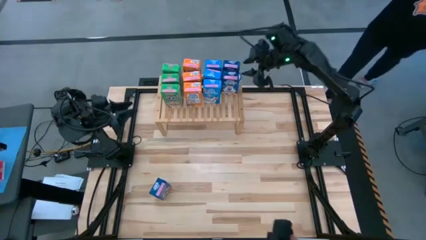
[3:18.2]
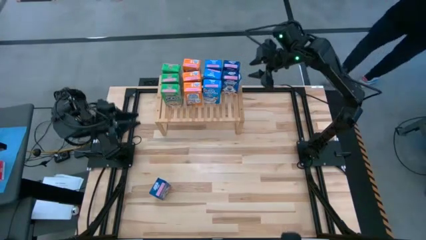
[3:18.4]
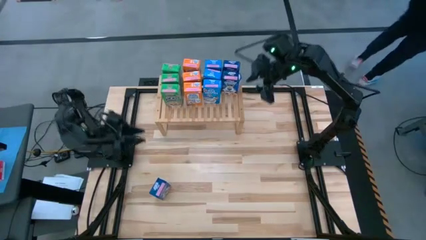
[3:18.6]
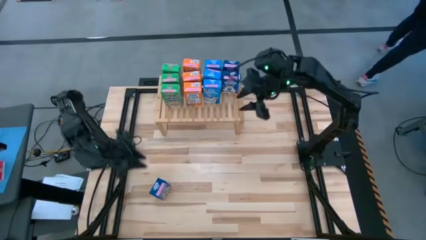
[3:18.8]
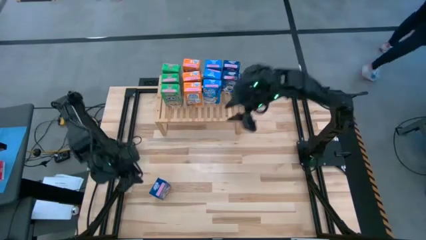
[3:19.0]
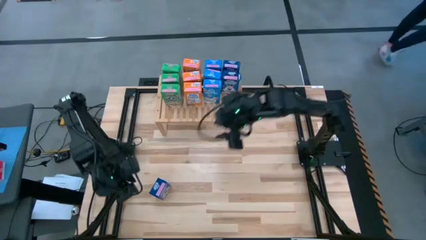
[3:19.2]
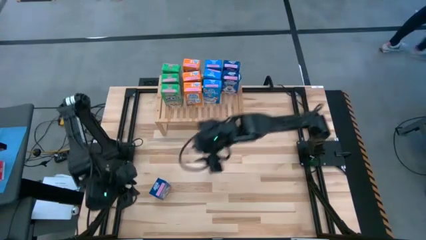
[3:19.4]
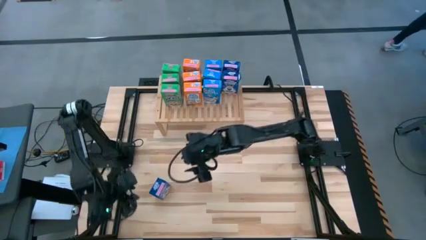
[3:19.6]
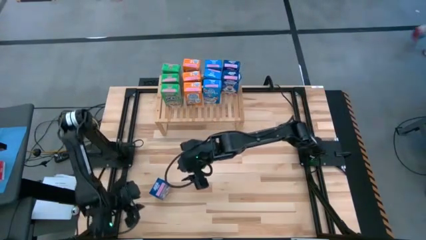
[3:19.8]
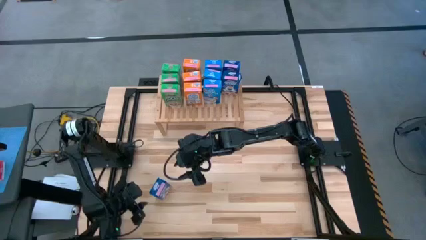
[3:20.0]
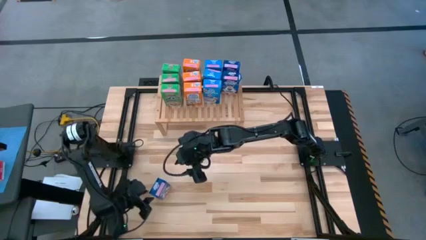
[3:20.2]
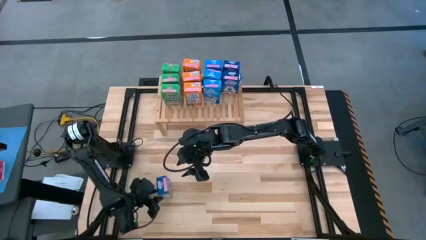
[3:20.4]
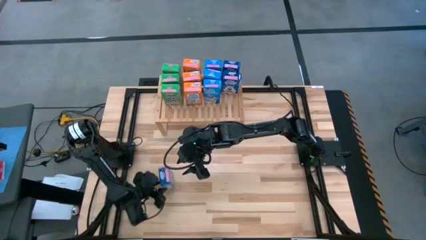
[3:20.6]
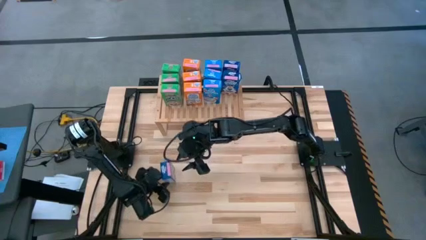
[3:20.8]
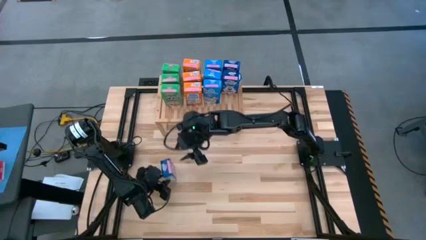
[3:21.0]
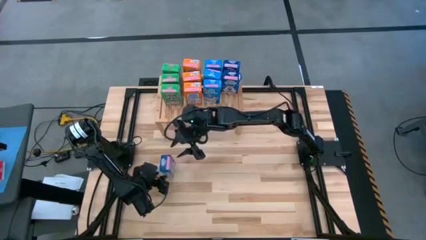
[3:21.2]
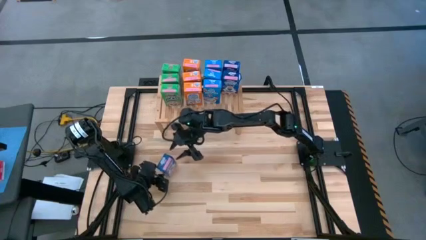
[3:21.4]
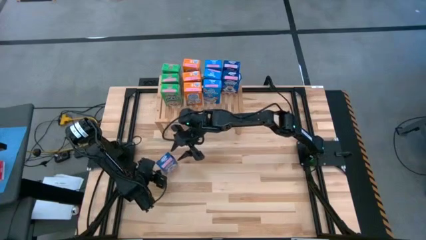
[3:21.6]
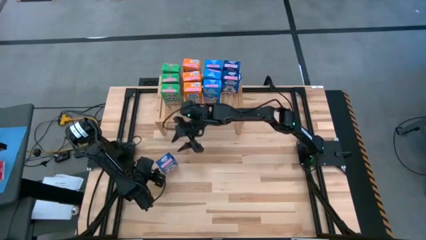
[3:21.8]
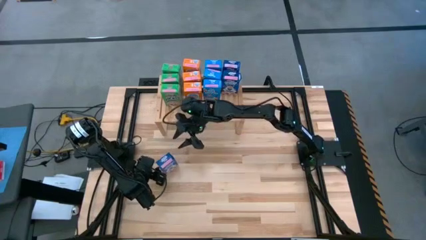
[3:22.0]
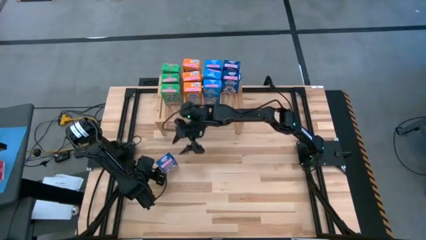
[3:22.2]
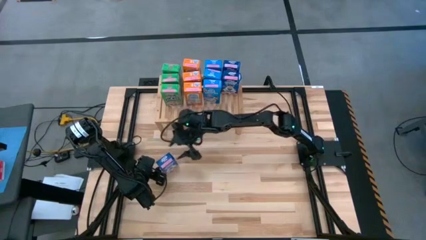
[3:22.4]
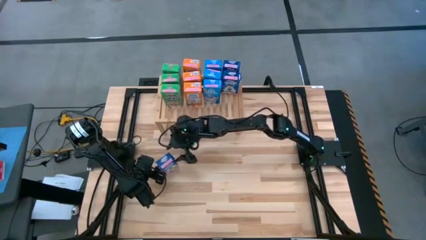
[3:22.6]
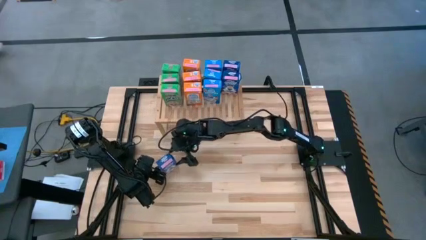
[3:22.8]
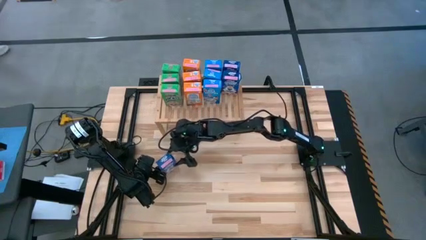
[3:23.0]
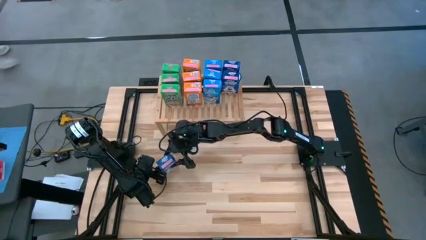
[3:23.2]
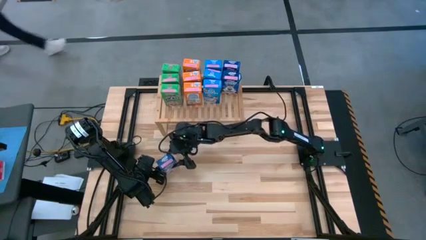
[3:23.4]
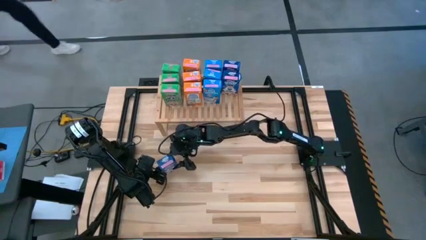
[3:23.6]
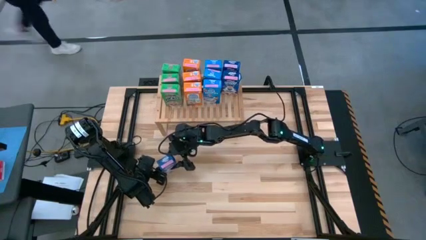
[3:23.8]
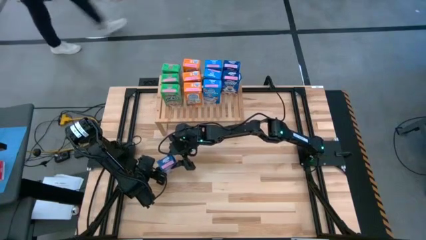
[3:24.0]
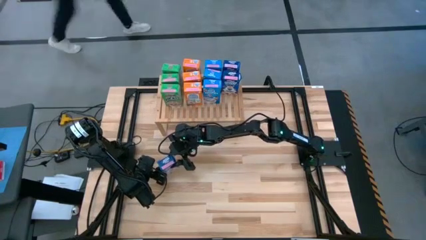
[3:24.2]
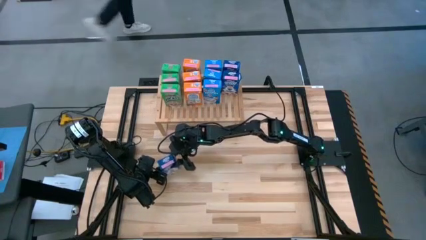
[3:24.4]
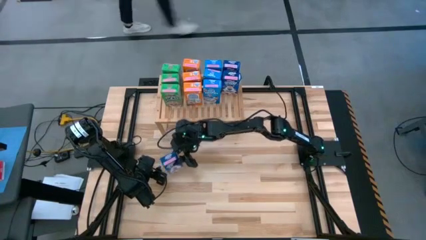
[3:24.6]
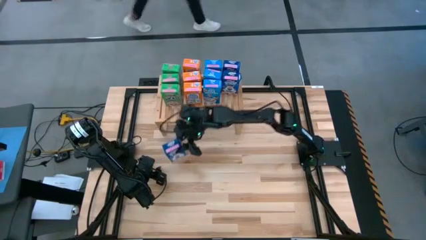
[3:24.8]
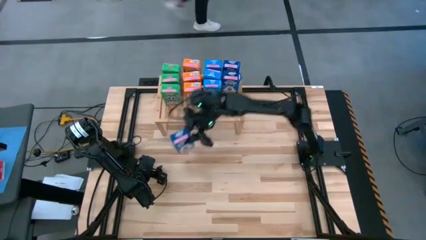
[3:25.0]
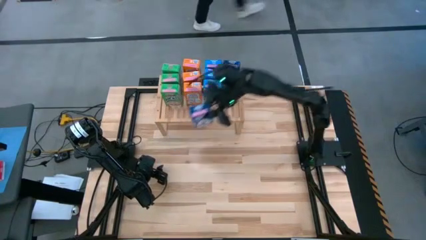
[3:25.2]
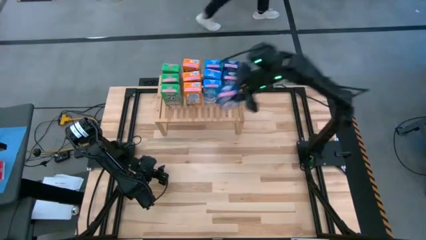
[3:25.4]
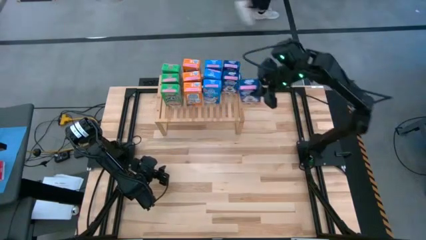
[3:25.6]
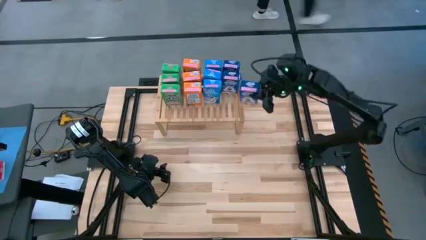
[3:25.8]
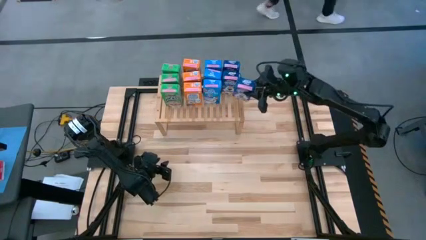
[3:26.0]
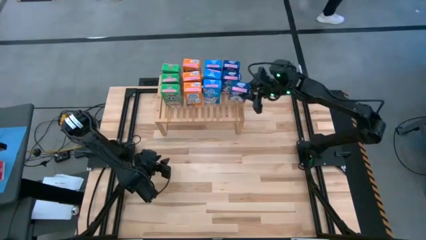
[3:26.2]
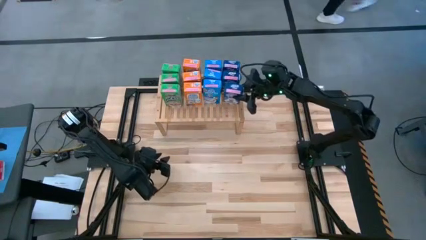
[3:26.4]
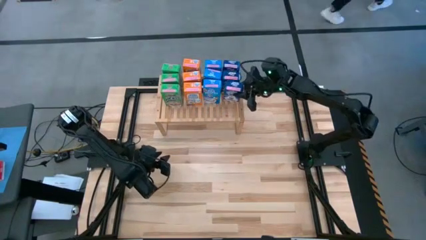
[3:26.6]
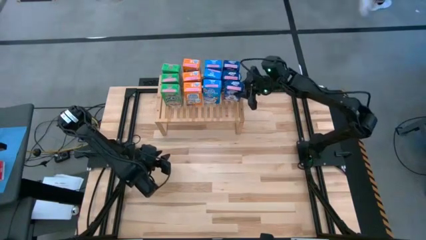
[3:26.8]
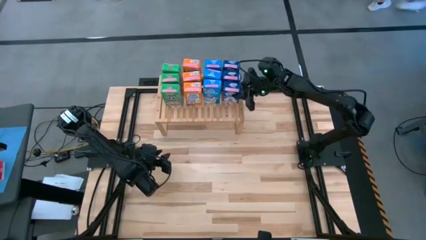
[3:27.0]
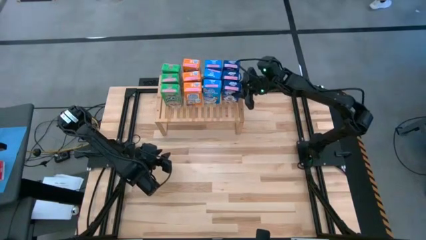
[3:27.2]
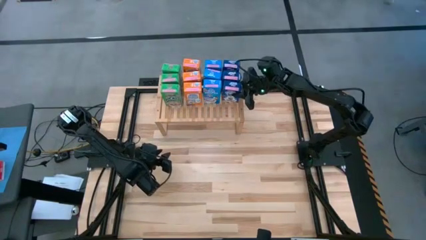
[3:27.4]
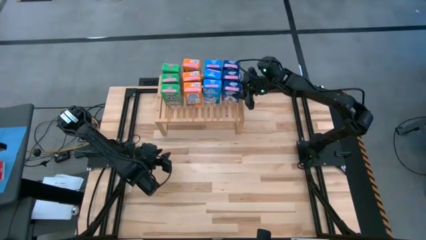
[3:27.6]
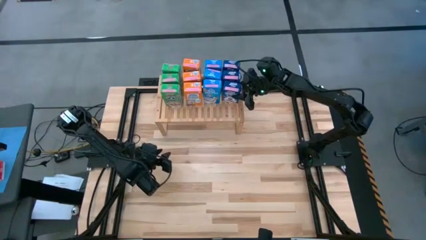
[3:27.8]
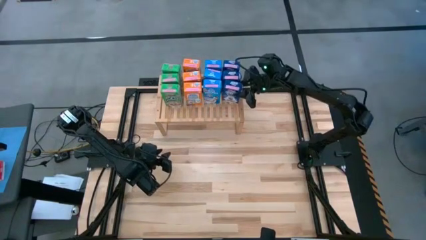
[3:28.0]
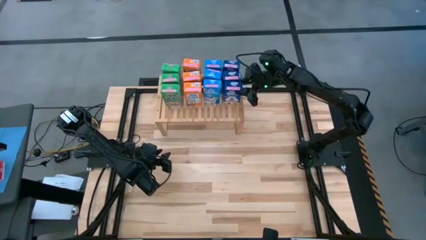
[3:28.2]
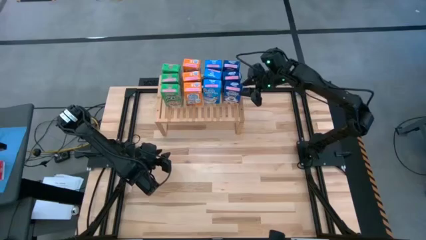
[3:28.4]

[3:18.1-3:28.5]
Task: Stack cereal on shelf
Put the blue cereal box on the shelf aligned with the other blue cereal boxes

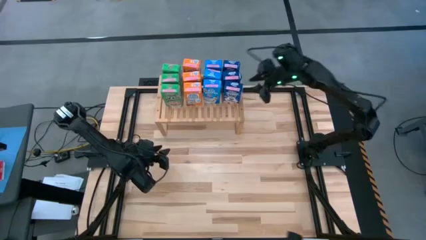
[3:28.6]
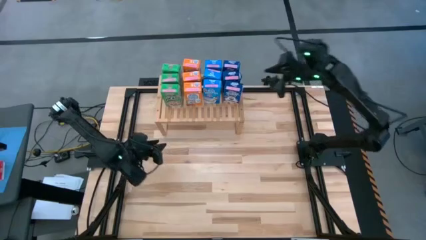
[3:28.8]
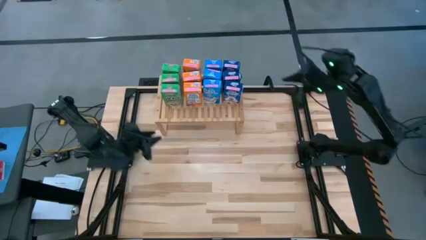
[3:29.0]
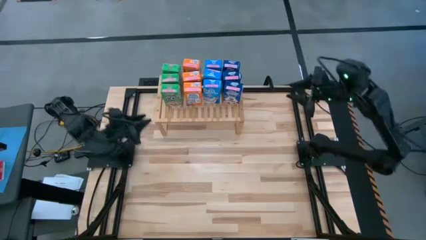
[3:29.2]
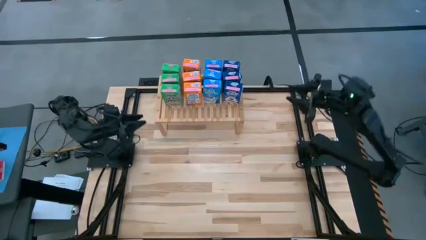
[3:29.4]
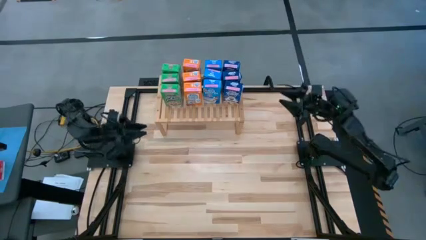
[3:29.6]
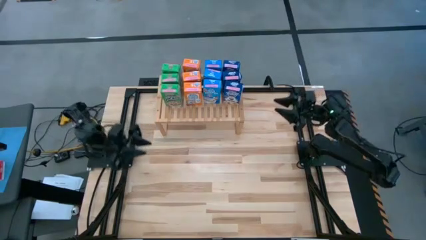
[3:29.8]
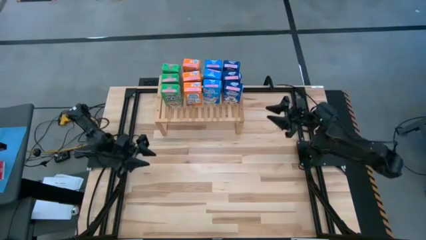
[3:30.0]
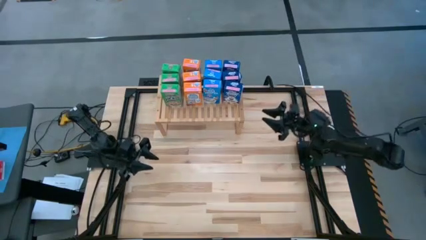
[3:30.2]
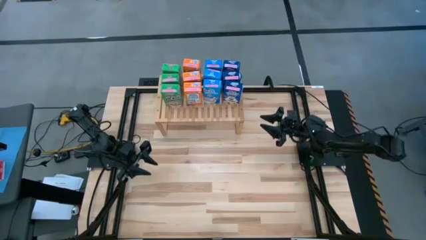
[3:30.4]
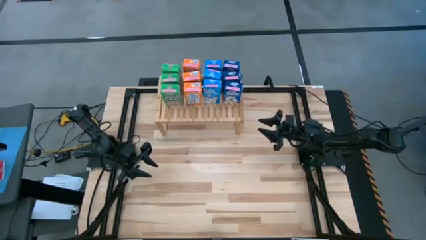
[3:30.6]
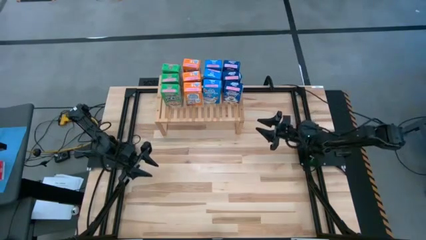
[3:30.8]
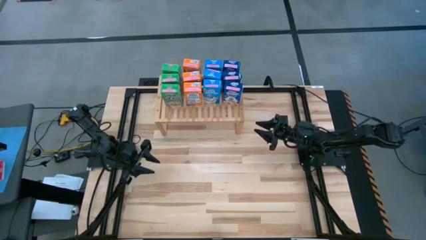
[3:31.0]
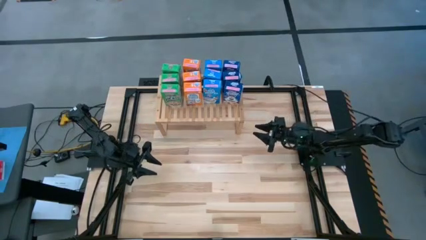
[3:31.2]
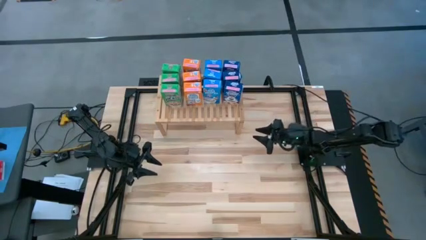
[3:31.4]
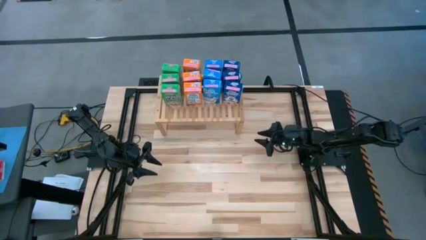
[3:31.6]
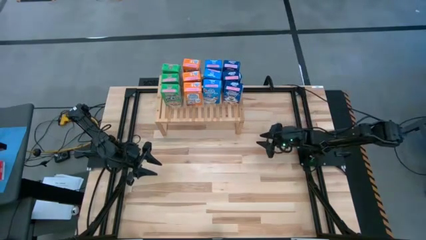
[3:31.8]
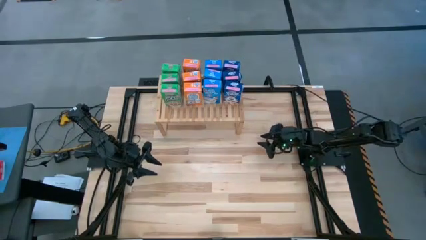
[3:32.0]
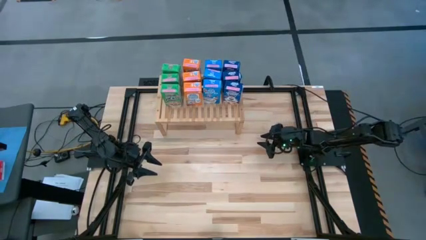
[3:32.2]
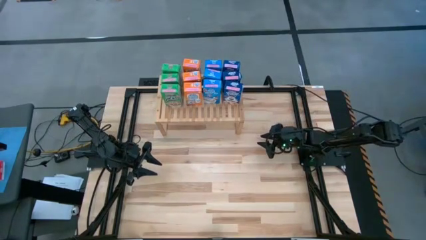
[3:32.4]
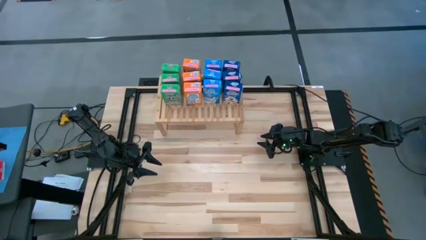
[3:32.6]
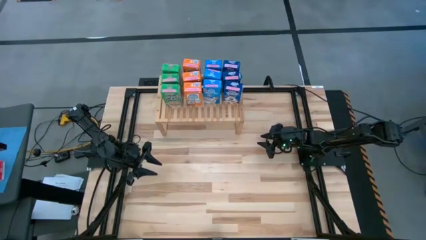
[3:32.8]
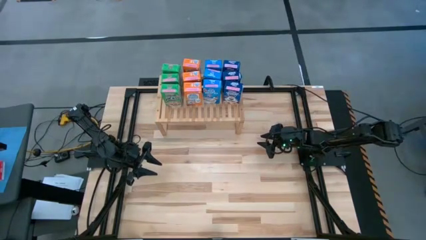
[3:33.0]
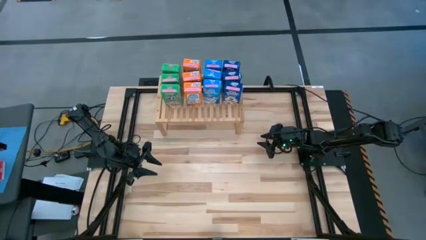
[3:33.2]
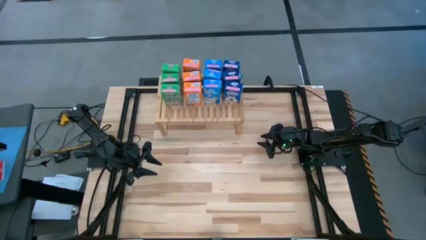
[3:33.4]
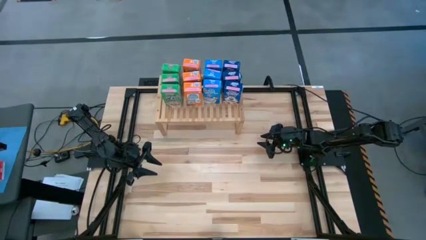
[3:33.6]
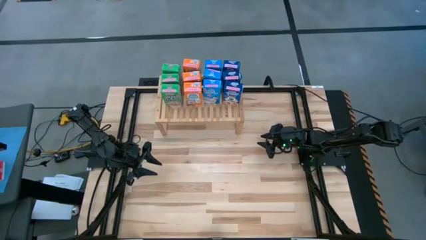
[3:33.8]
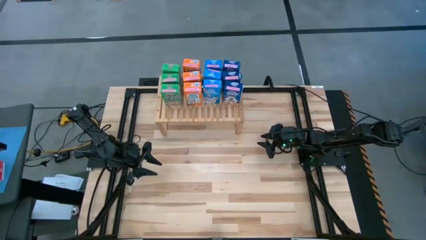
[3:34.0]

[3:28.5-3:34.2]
Return to Home Position
